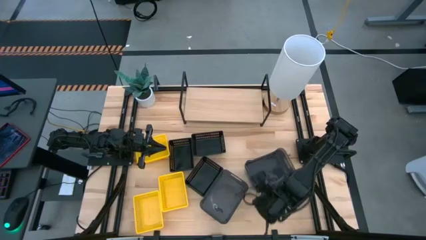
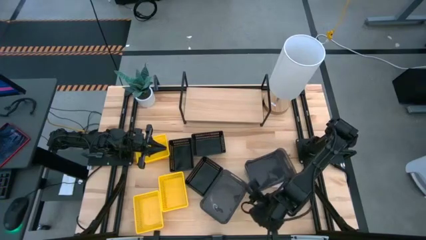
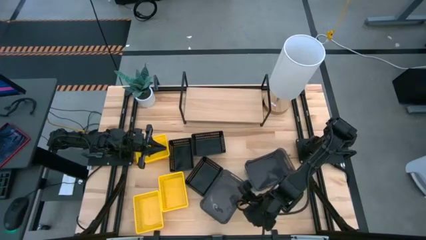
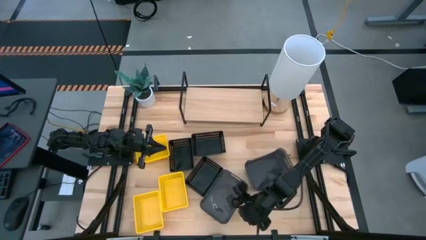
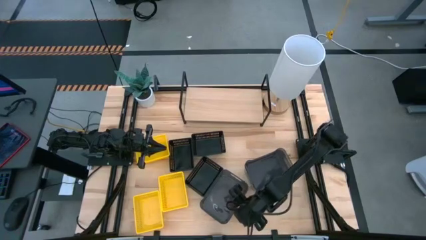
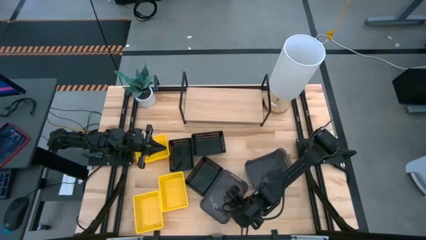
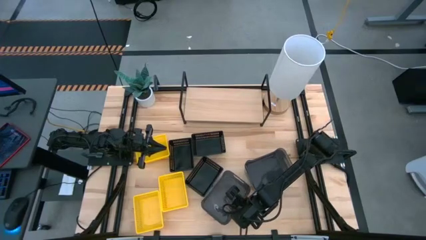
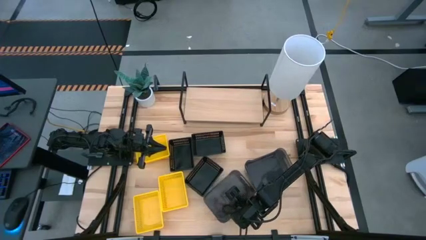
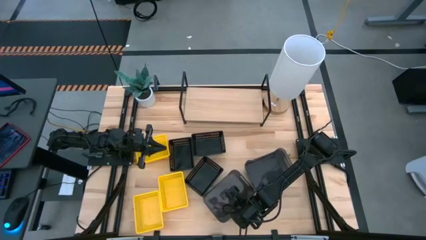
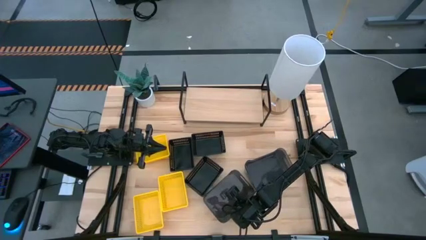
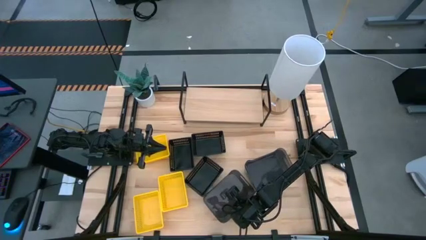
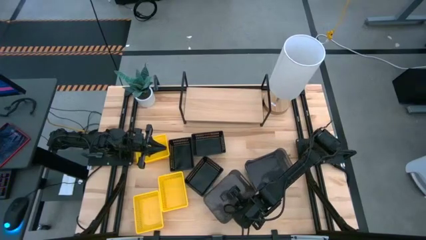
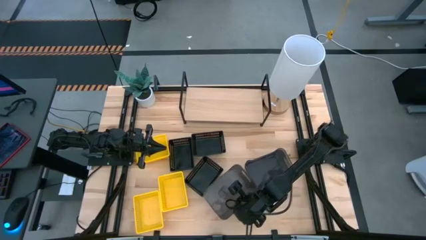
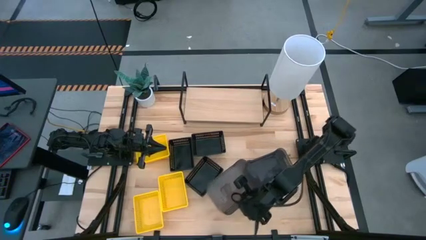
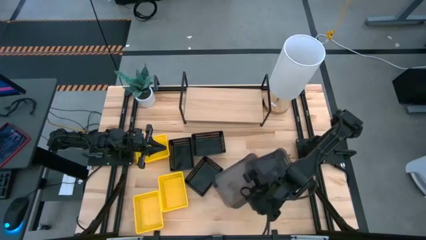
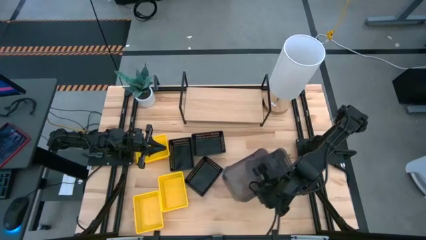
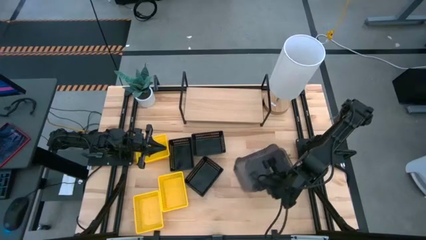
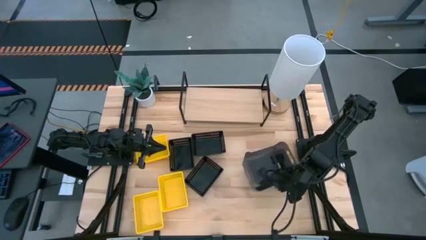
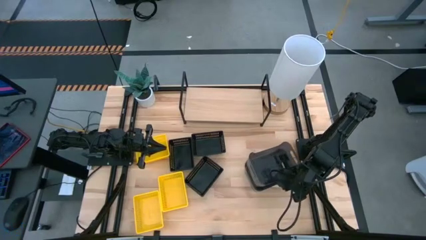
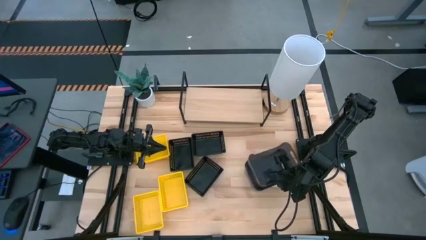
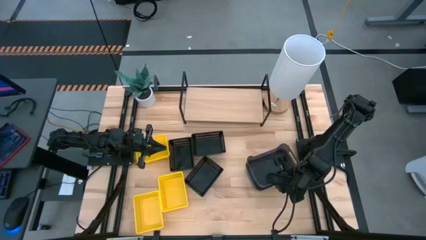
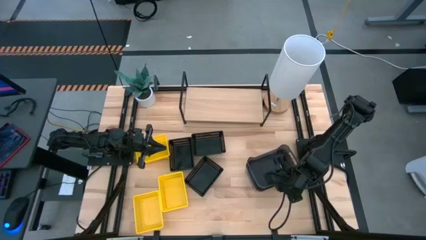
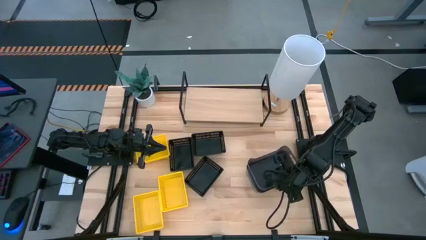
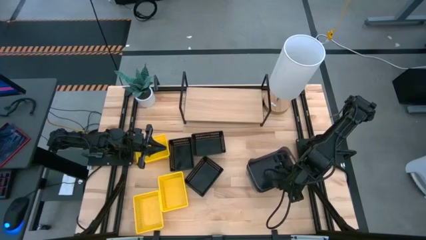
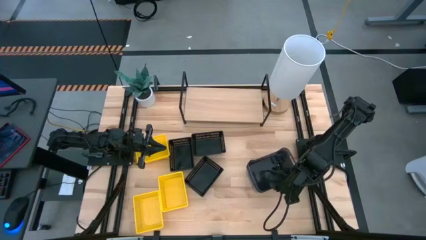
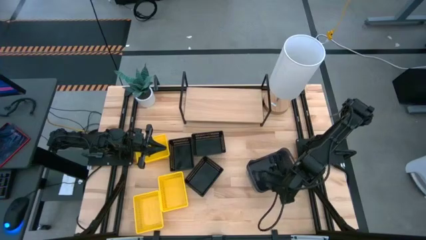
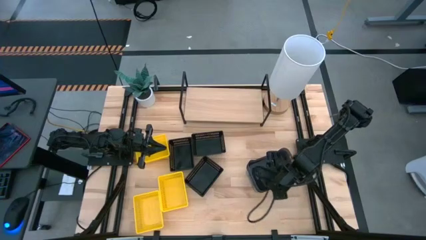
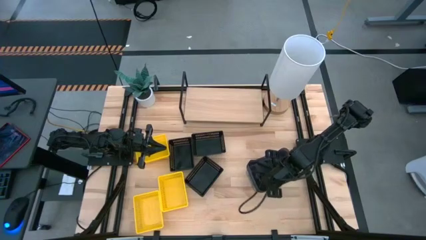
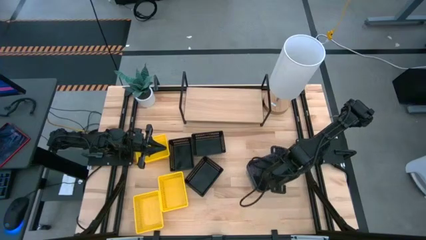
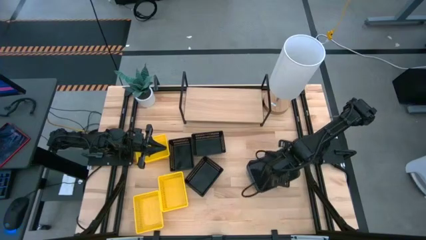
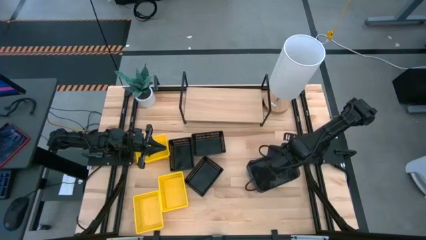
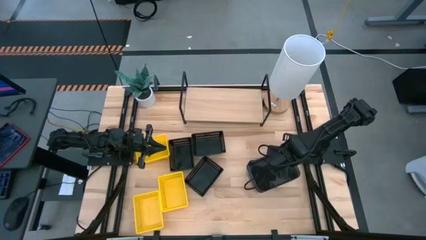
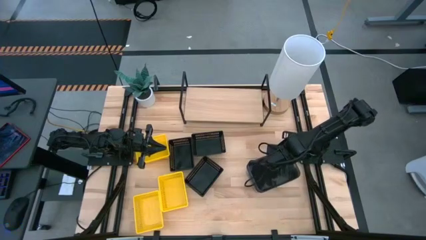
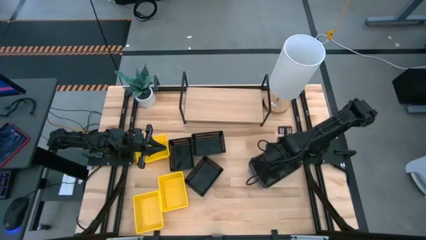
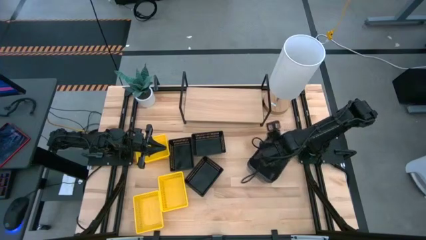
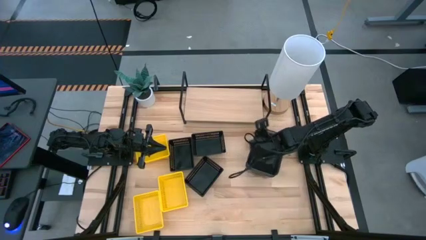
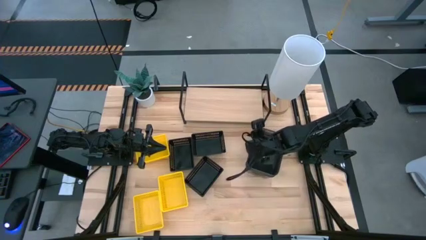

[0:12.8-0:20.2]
Task: Stack baskets on shelf by color
Stack the gray bin on the stacked gray bins

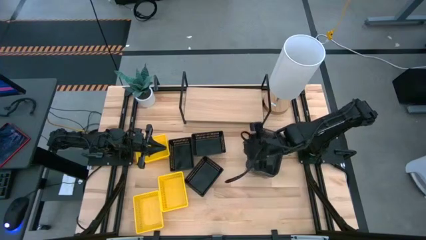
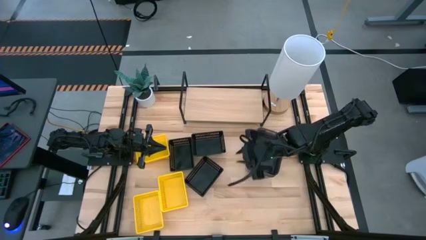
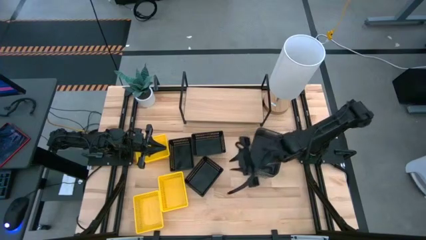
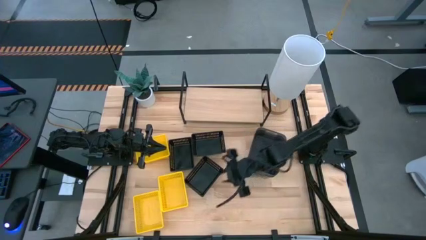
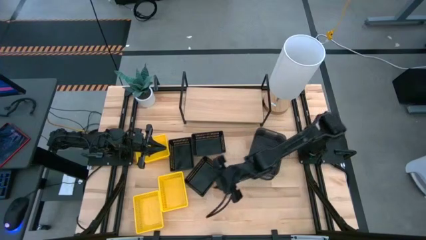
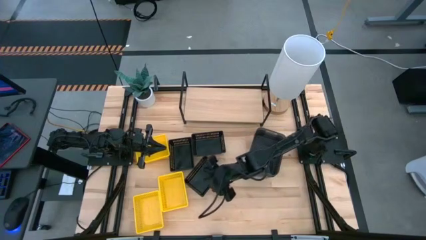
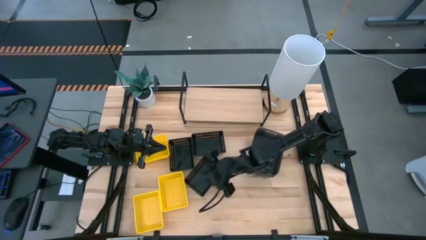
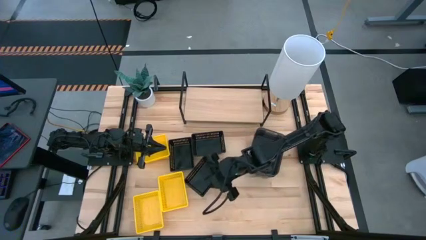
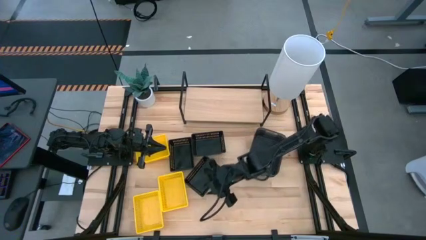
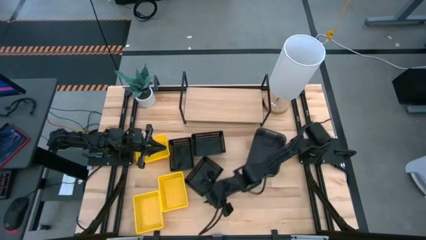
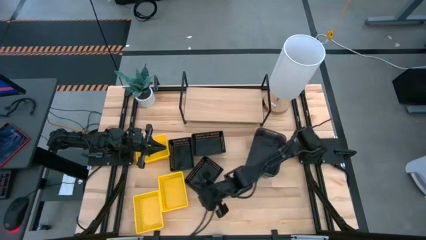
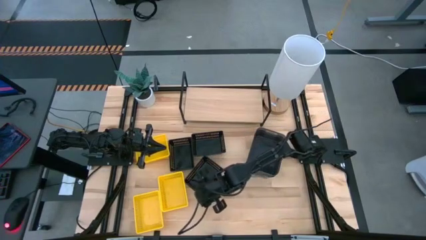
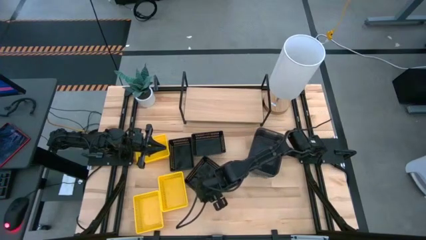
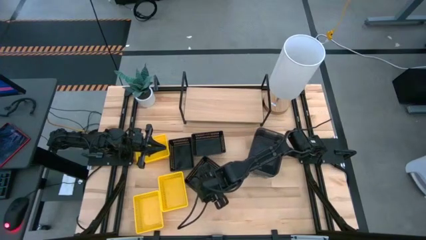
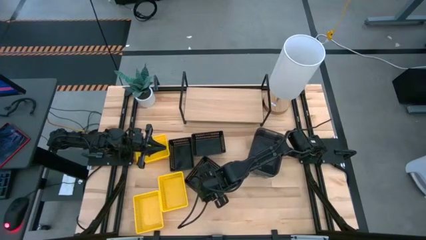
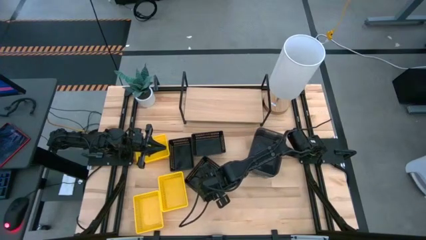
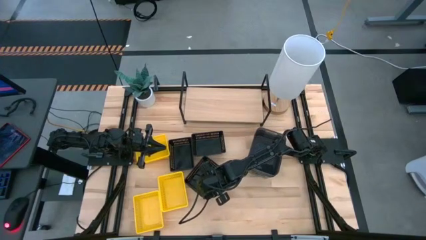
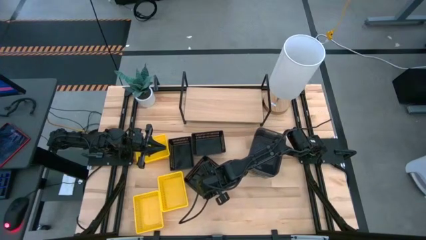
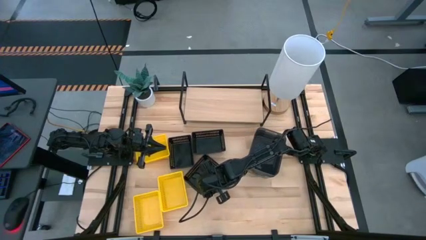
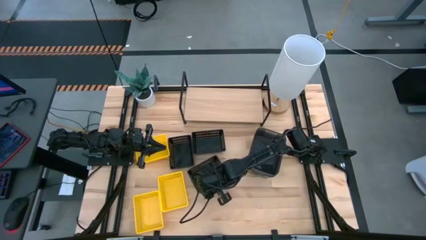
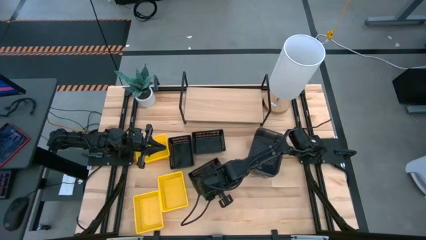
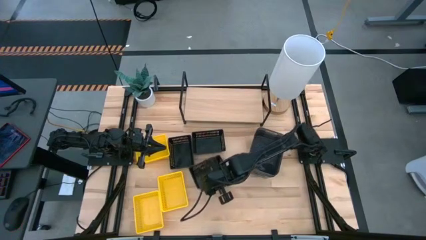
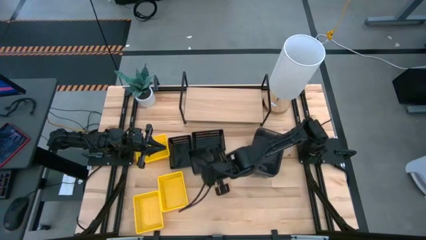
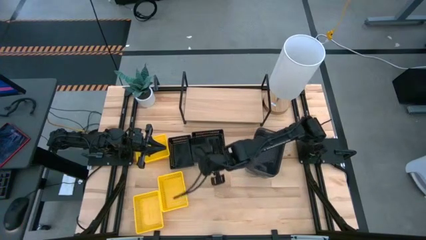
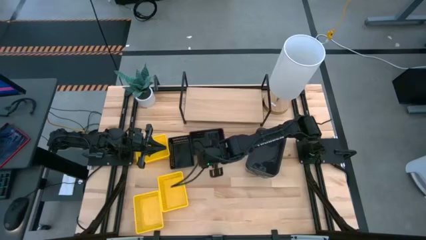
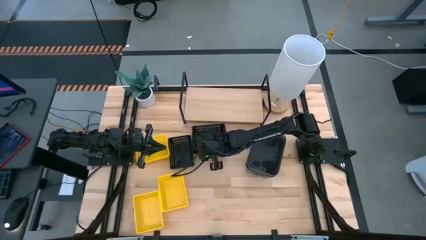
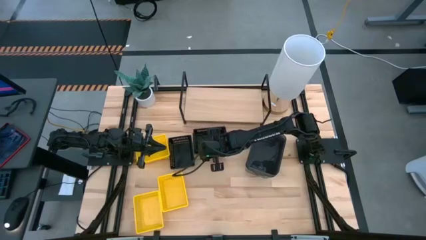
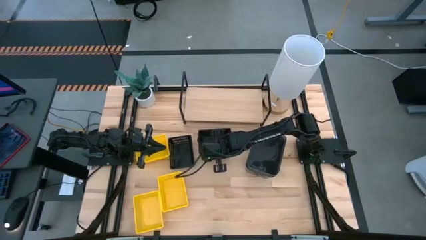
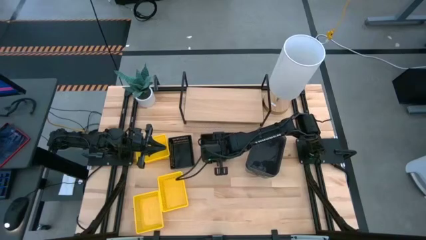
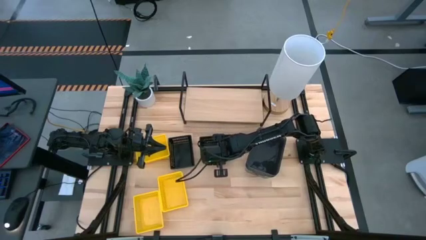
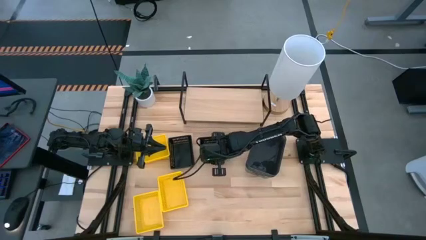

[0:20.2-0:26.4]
Stack the bottom right black bin on the right black bin

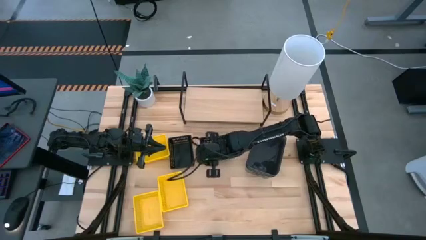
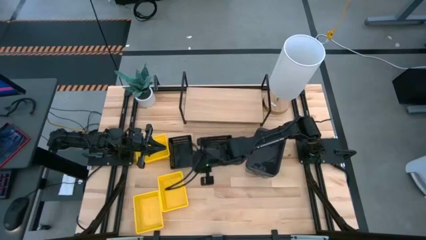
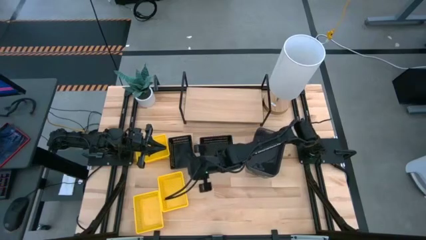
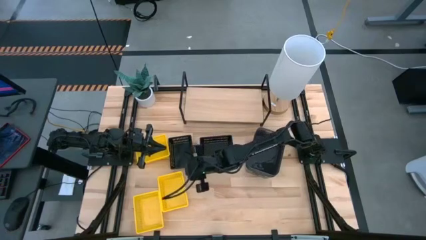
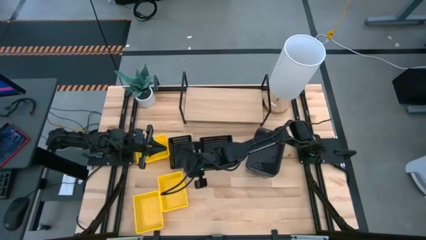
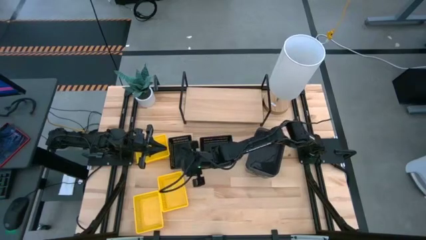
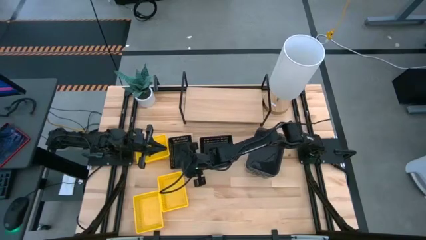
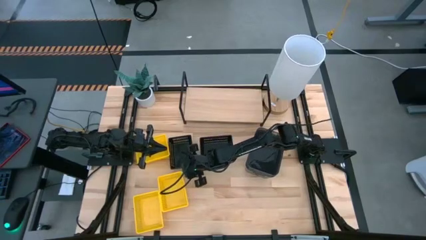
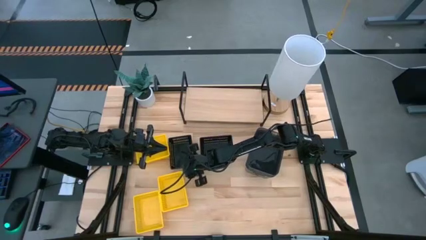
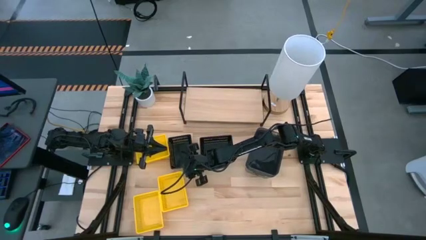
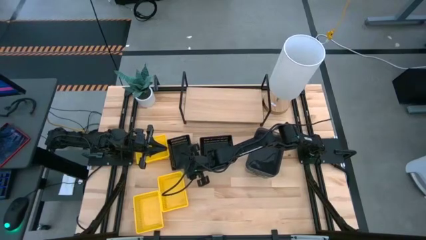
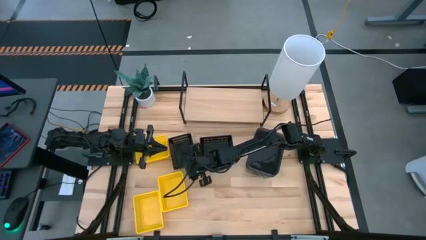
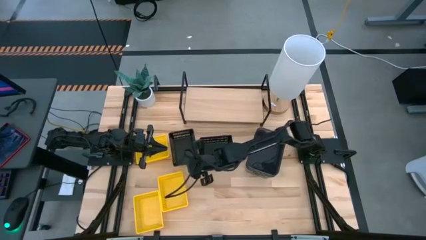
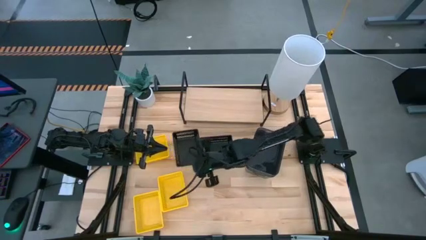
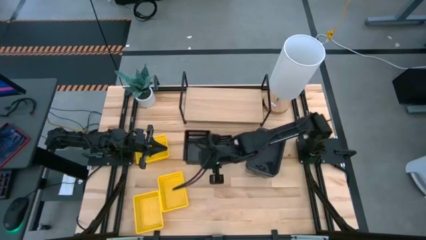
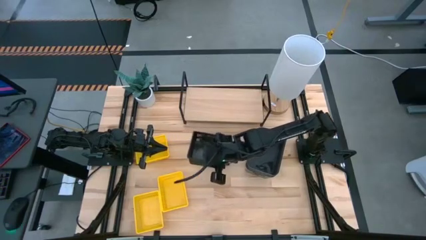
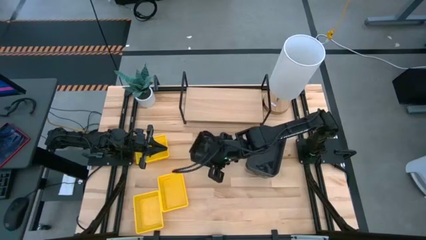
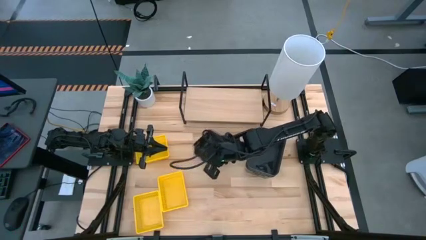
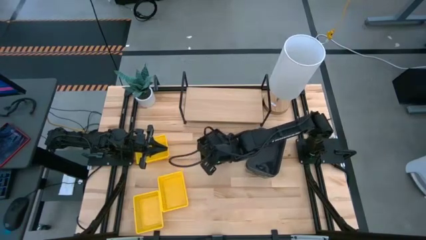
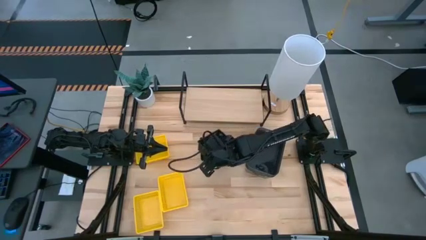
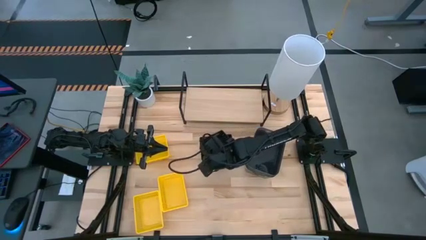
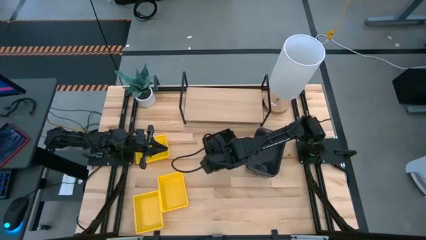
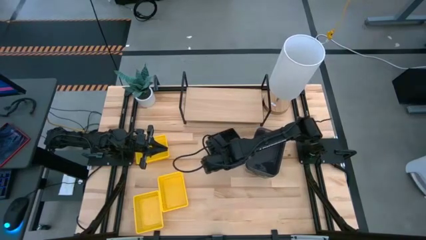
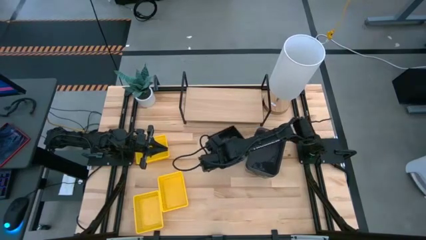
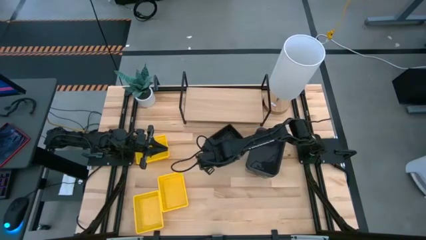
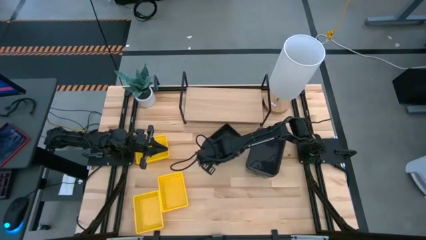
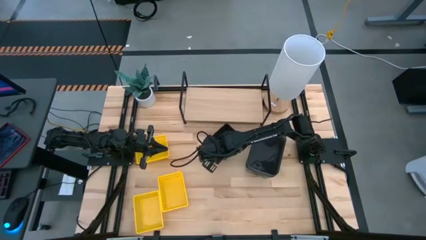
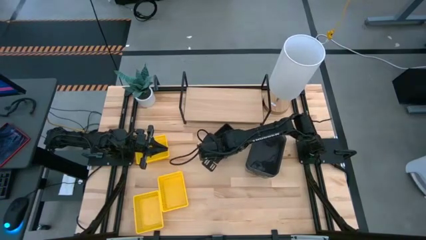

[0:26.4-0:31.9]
Stack the black bin on the stacked black bins
